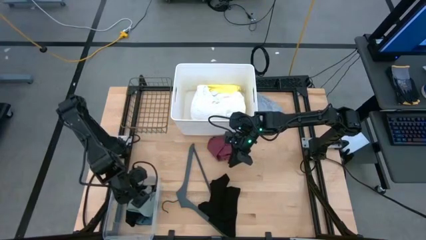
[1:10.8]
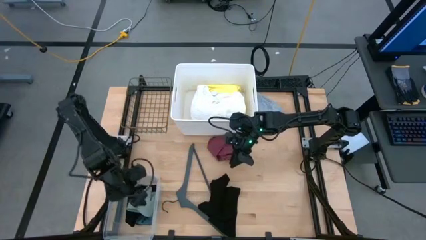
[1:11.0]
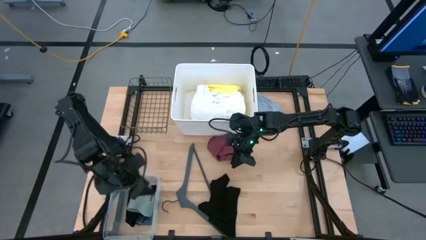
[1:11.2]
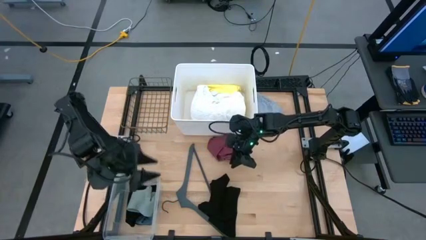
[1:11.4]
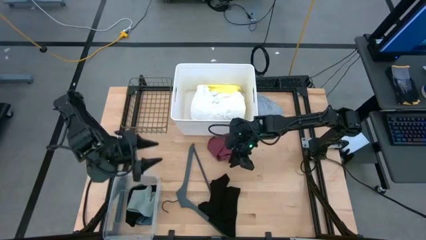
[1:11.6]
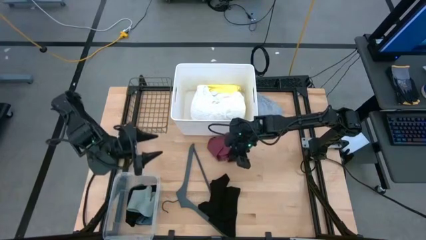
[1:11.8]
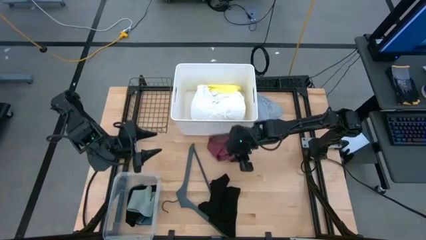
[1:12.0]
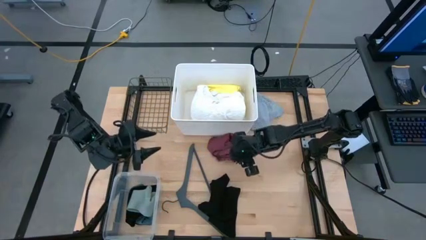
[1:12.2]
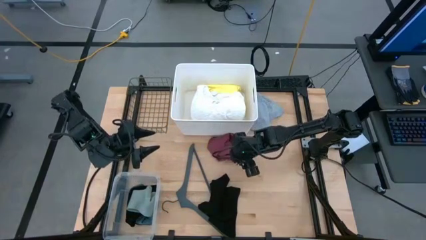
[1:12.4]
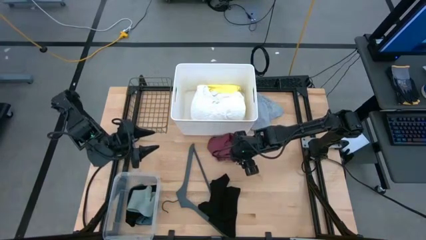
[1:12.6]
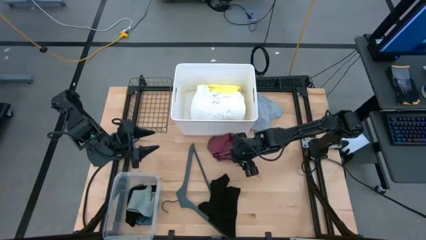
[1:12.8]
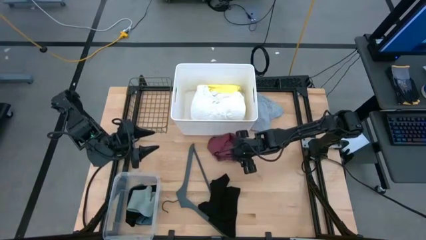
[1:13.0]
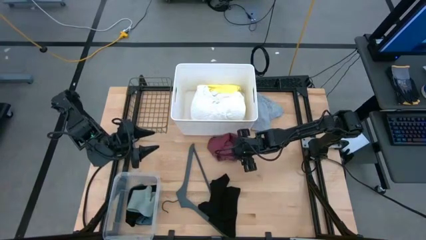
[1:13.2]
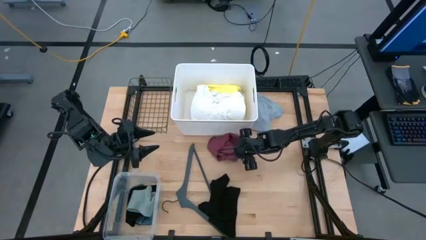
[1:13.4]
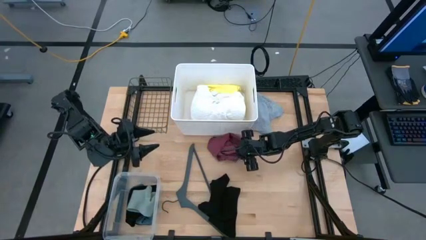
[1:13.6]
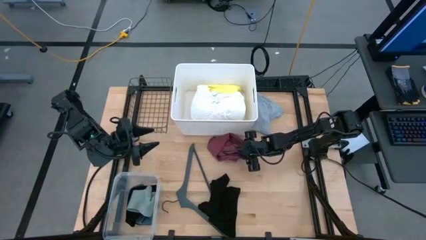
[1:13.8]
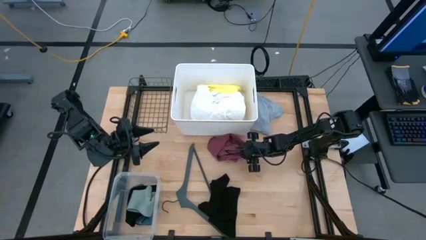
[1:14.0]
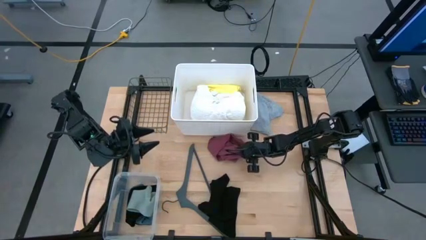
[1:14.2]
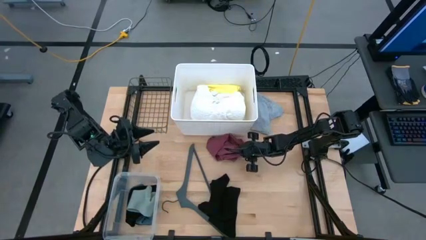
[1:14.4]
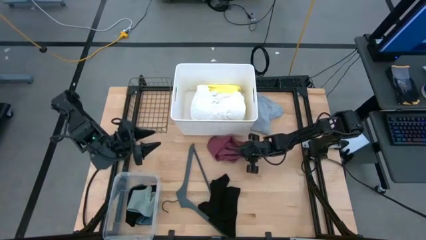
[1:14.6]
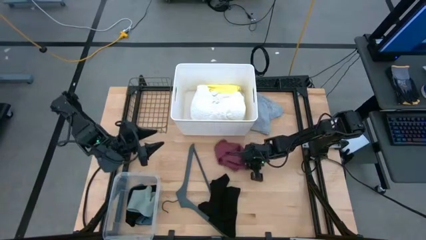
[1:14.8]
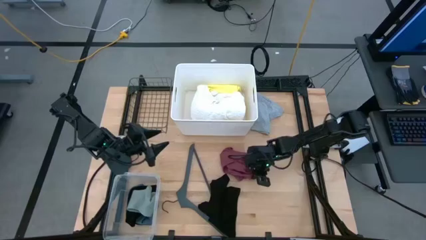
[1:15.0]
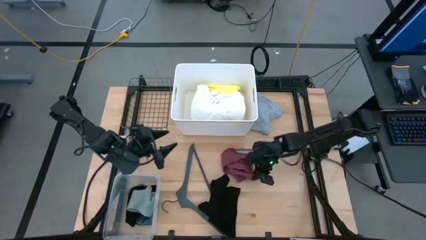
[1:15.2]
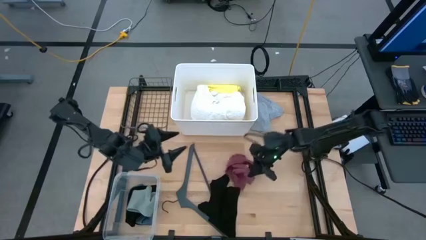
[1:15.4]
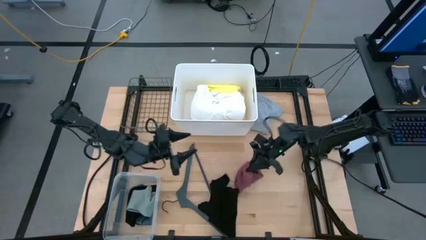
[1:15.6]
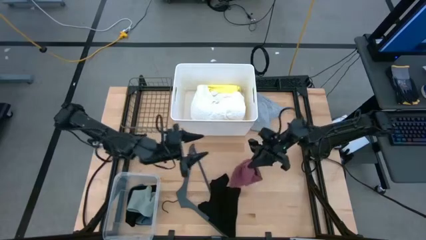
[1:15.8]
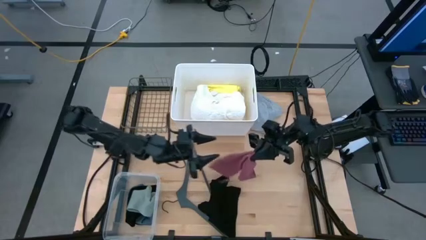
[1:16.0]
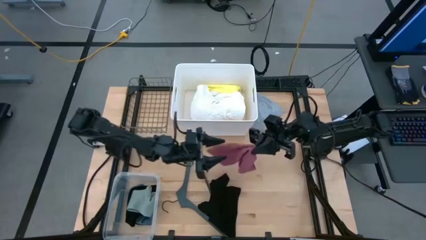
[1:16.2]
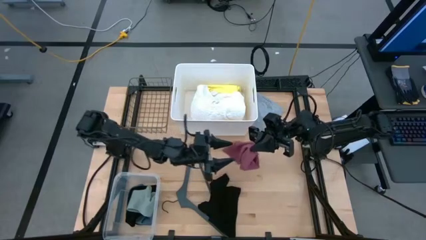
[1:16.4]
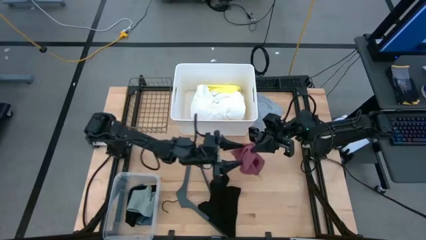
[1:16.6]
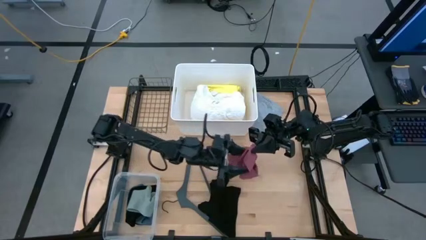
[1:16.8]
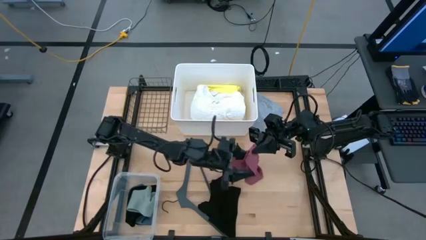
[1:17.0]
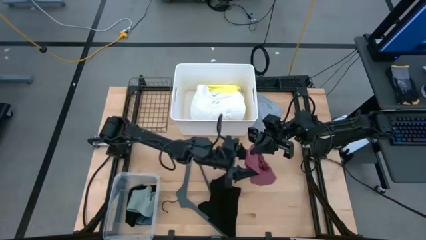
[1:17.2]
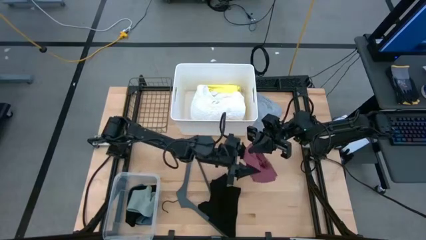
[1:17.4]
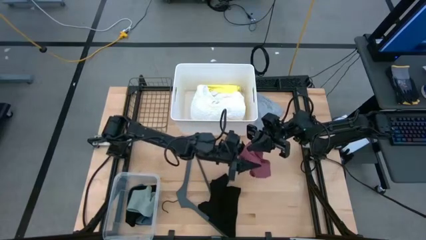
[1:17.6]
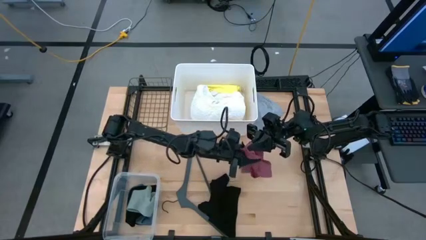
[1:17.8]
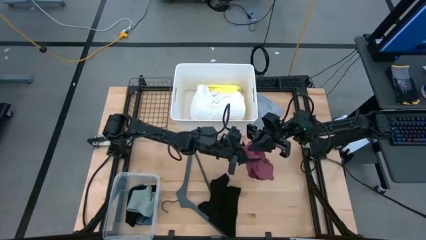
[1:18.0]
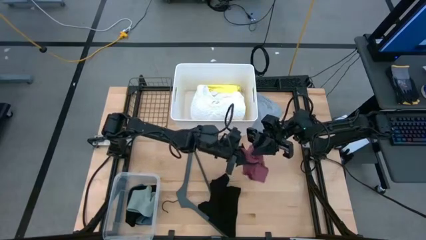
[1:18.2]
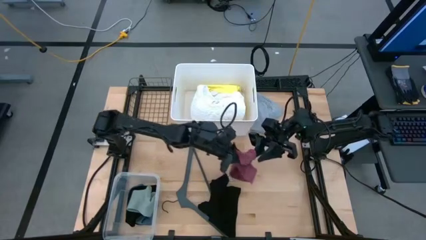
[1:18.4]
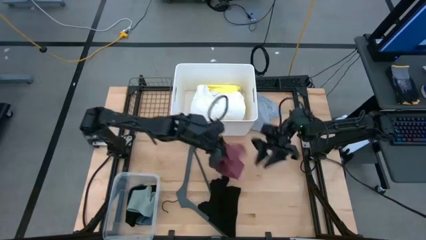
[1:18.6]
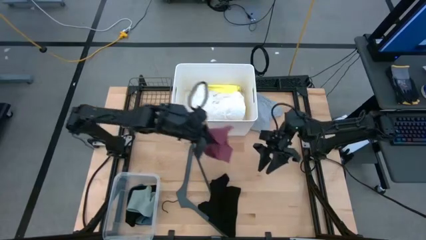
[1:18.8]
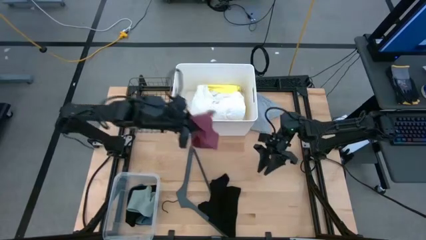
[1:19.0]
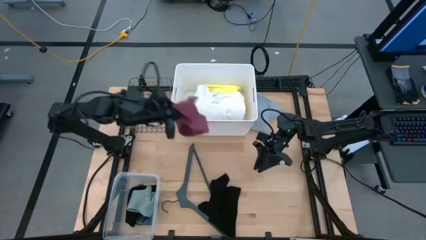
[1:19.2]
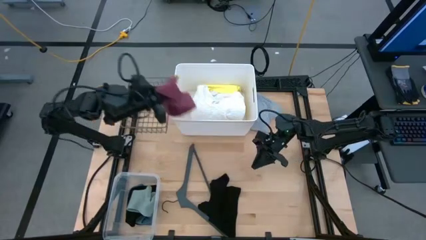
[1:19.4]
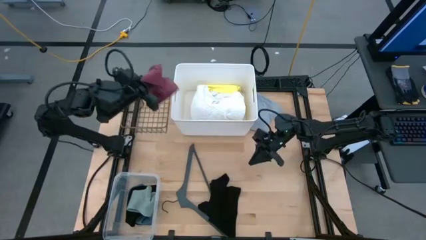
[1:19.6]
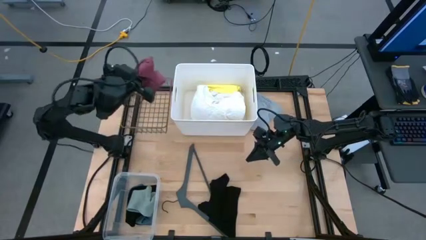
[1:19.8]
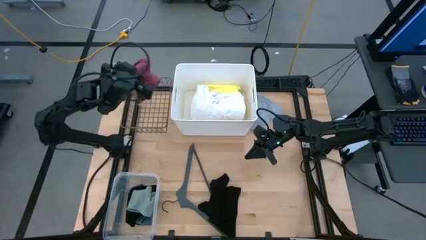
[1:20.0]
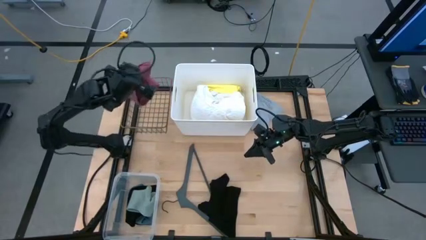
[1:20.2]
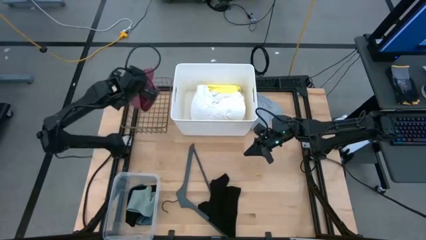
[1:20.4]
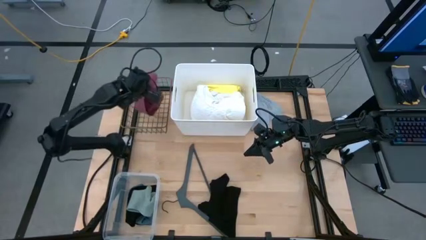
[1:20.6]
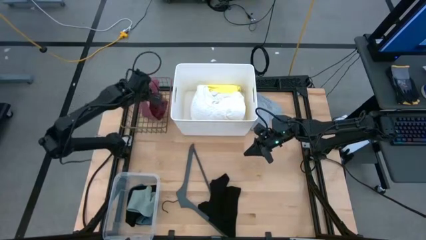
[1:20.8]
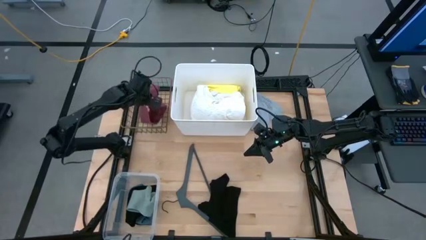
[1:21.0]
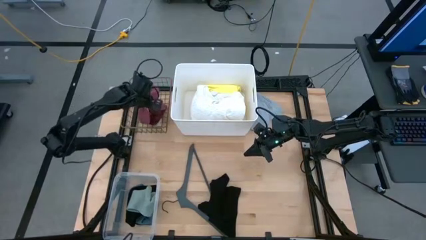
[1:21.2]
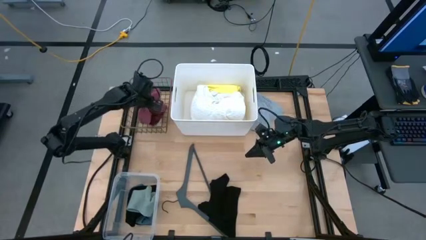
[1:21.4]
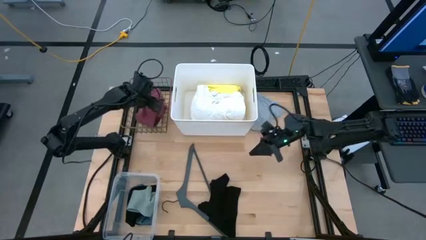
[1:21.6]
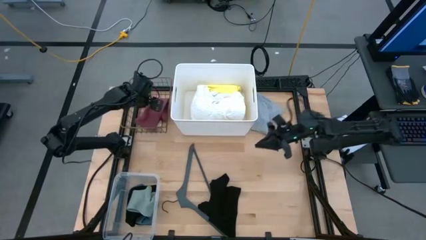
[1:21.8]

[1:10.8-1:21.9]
Task: Pick & Place Cloths
Put the pink pants into the wire basket
